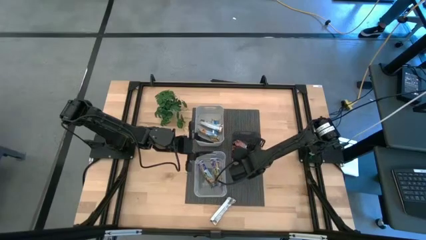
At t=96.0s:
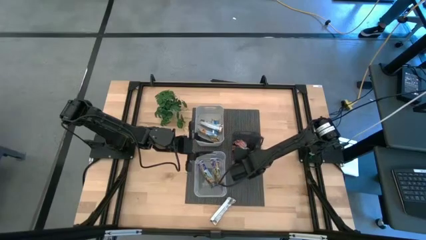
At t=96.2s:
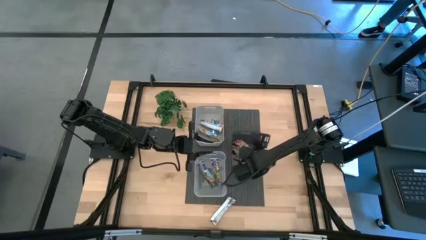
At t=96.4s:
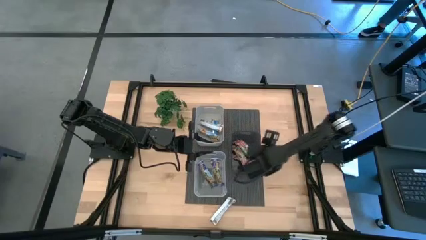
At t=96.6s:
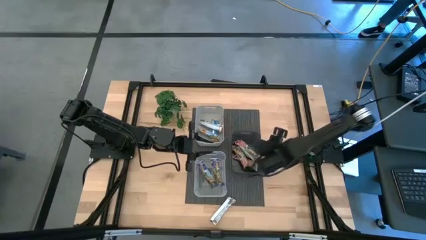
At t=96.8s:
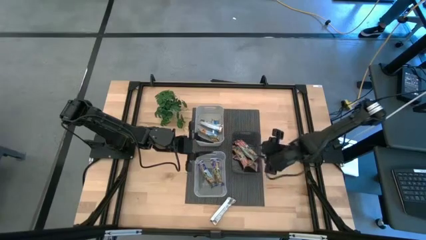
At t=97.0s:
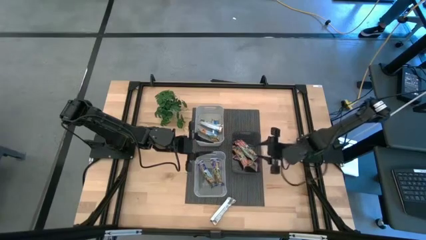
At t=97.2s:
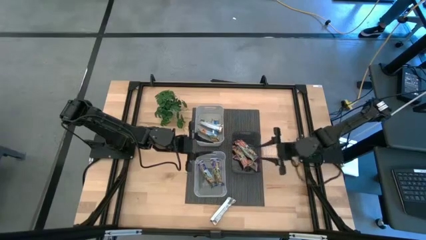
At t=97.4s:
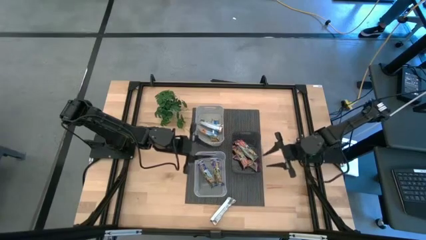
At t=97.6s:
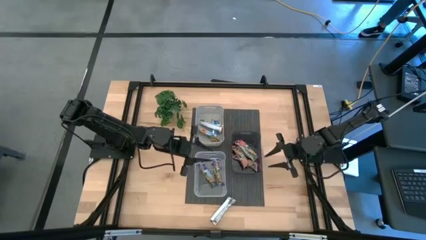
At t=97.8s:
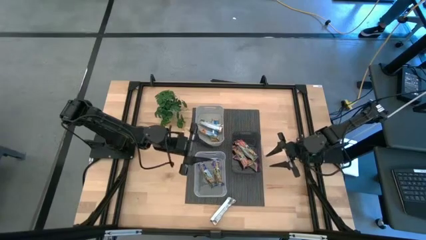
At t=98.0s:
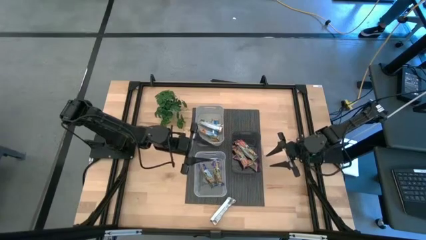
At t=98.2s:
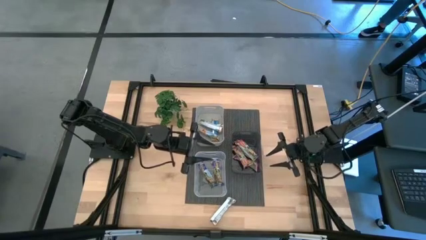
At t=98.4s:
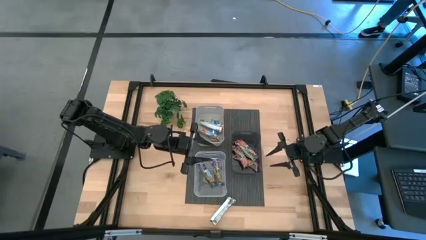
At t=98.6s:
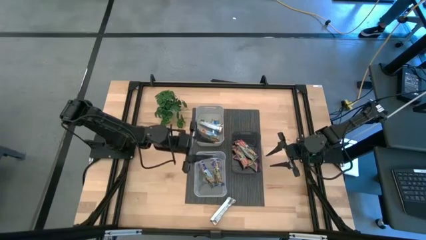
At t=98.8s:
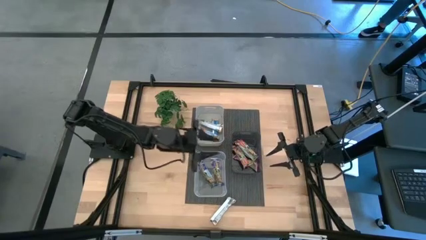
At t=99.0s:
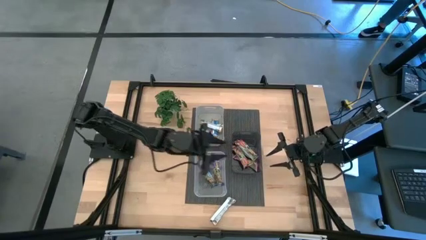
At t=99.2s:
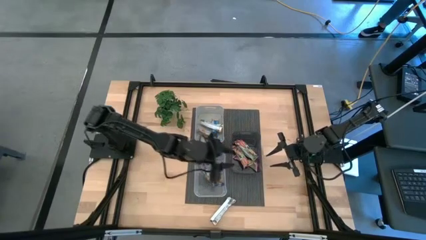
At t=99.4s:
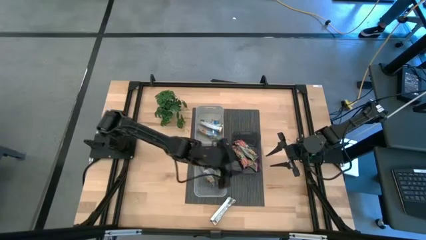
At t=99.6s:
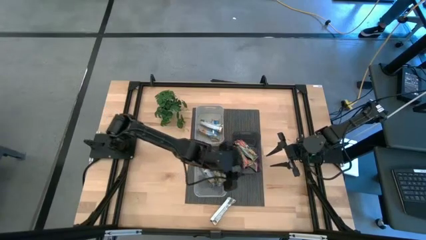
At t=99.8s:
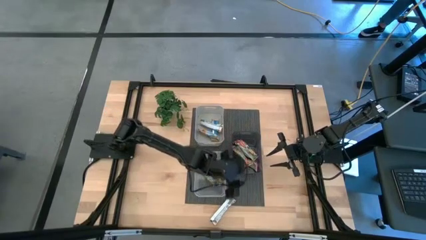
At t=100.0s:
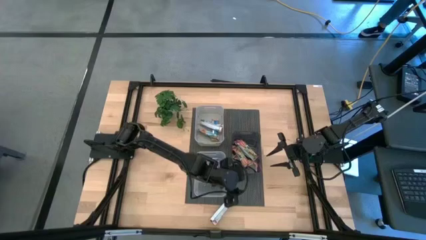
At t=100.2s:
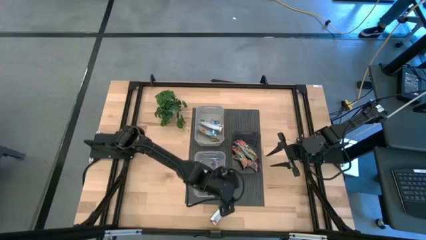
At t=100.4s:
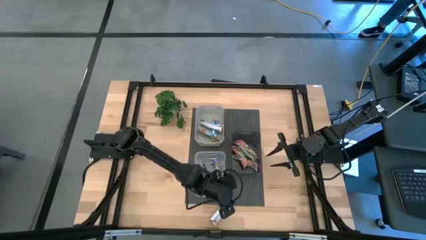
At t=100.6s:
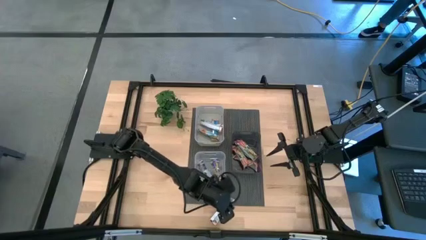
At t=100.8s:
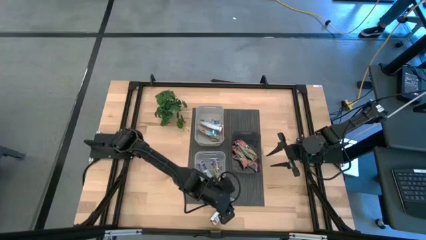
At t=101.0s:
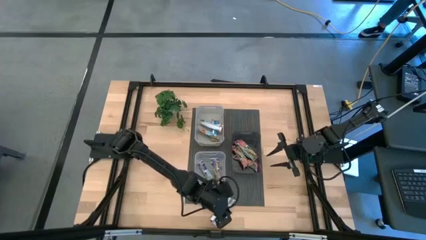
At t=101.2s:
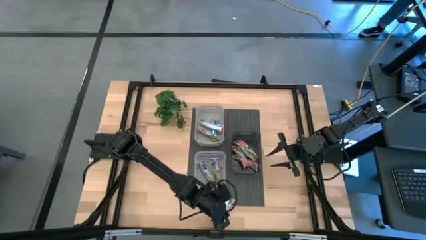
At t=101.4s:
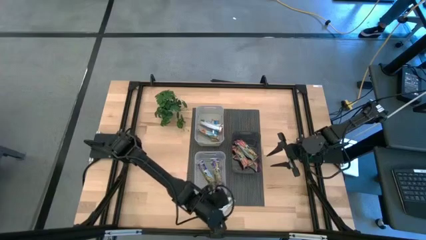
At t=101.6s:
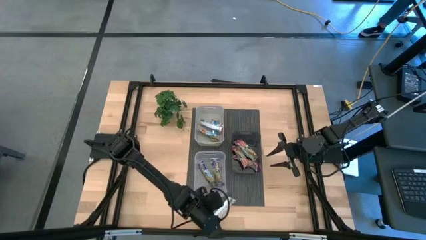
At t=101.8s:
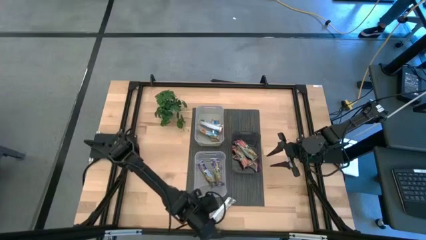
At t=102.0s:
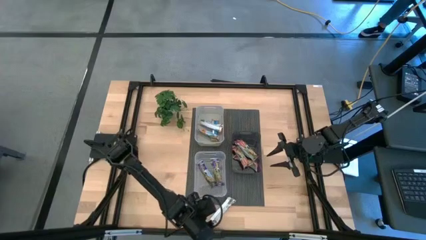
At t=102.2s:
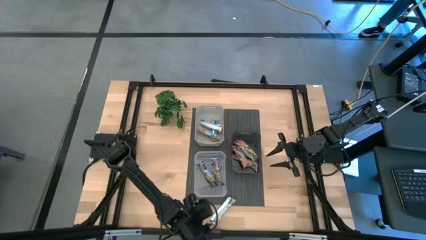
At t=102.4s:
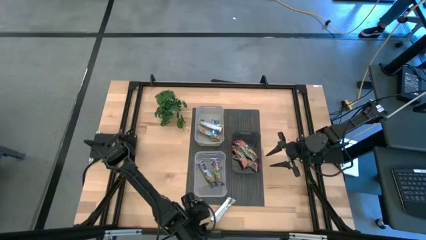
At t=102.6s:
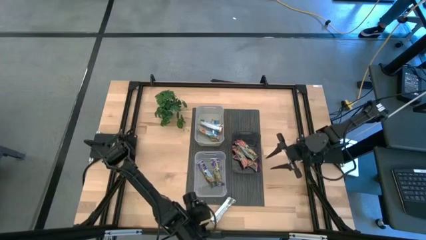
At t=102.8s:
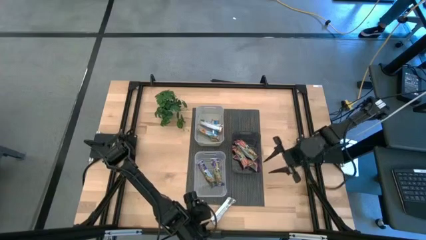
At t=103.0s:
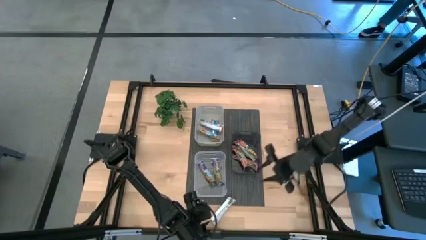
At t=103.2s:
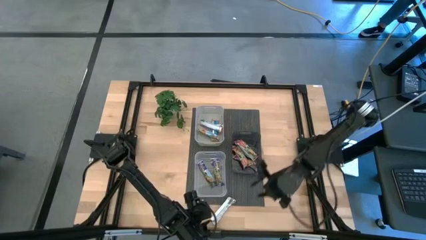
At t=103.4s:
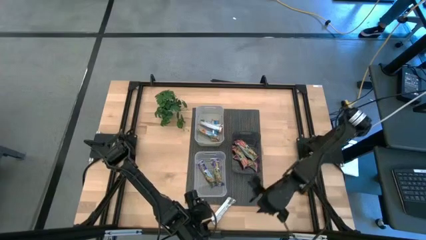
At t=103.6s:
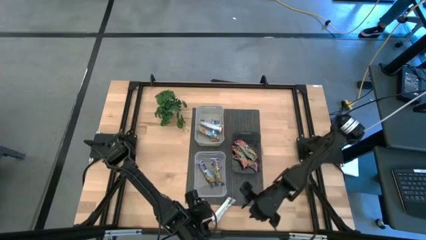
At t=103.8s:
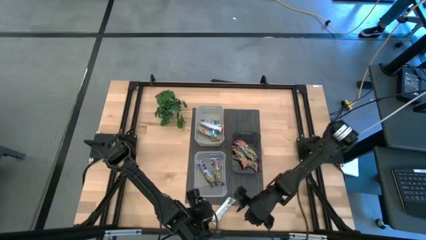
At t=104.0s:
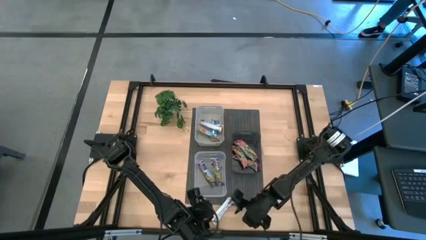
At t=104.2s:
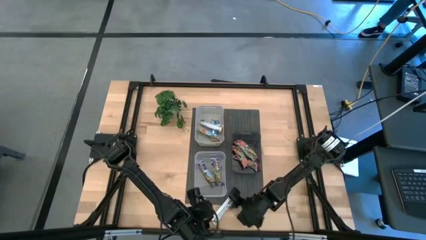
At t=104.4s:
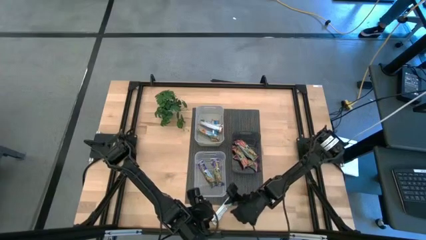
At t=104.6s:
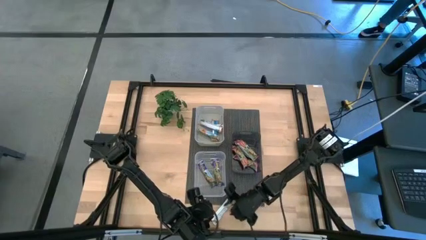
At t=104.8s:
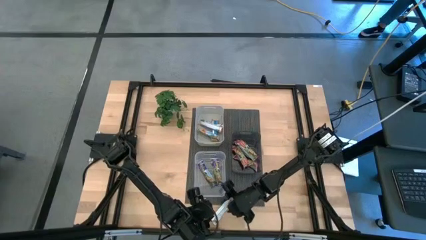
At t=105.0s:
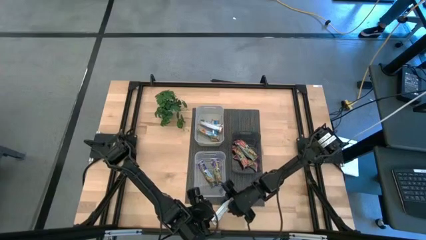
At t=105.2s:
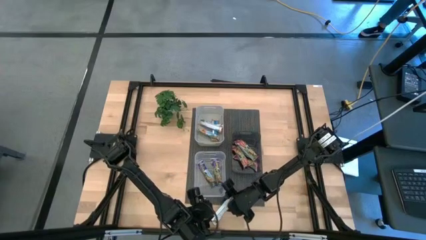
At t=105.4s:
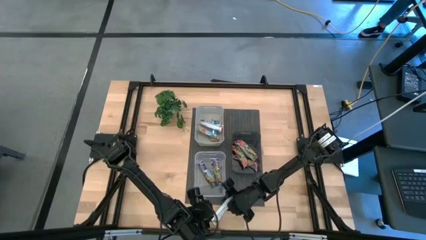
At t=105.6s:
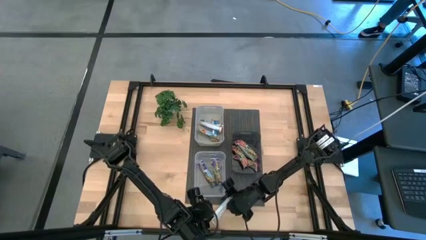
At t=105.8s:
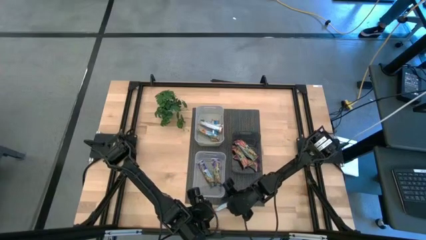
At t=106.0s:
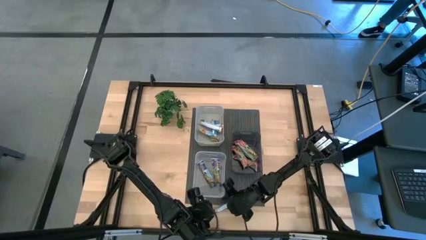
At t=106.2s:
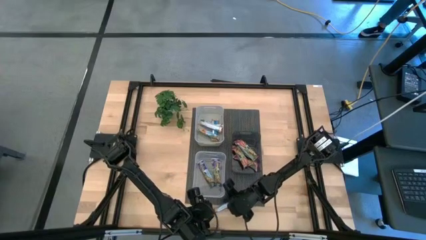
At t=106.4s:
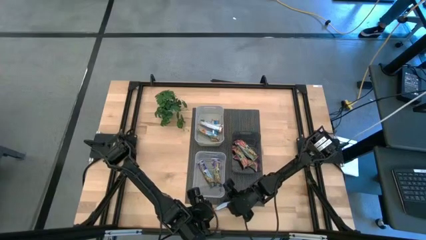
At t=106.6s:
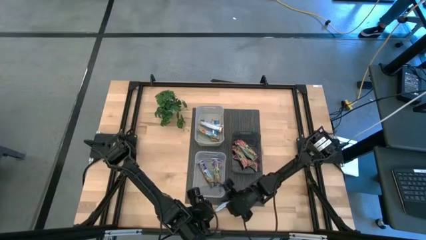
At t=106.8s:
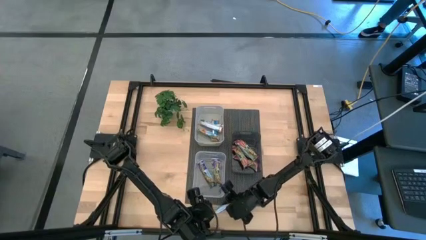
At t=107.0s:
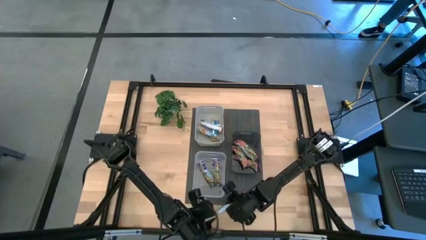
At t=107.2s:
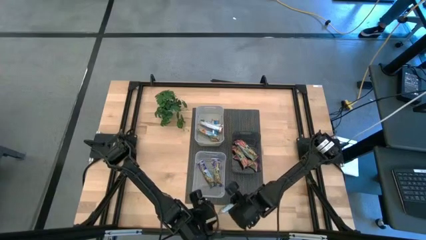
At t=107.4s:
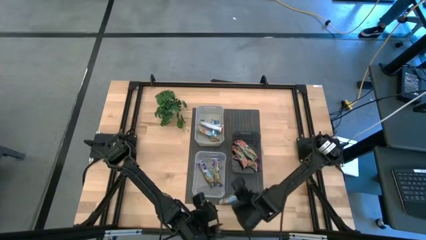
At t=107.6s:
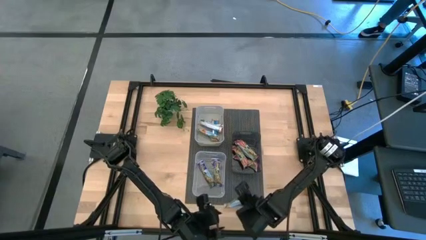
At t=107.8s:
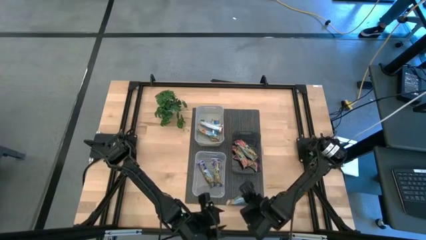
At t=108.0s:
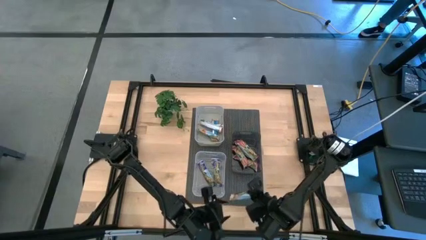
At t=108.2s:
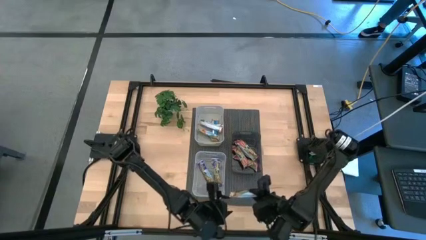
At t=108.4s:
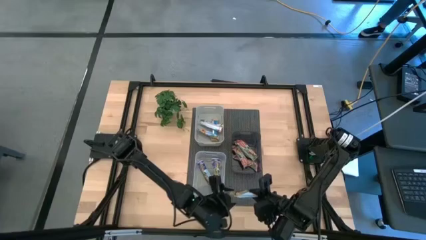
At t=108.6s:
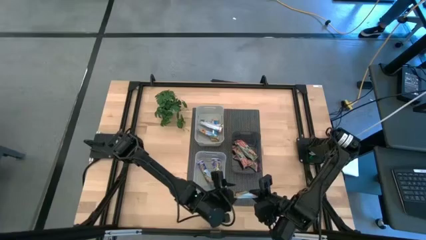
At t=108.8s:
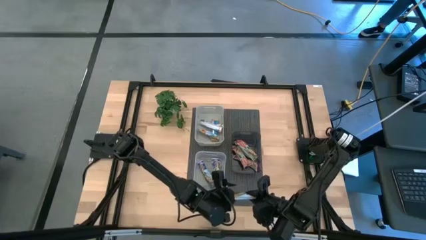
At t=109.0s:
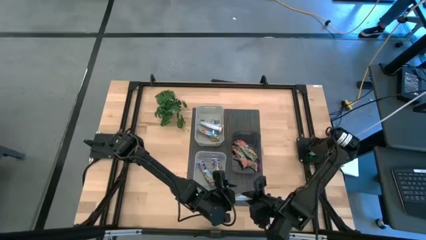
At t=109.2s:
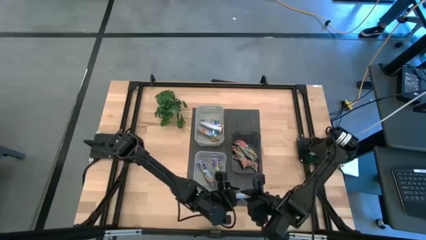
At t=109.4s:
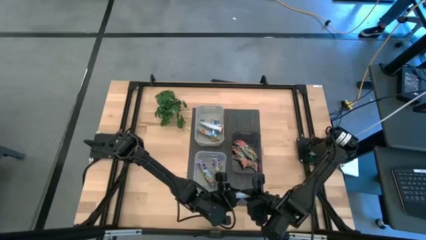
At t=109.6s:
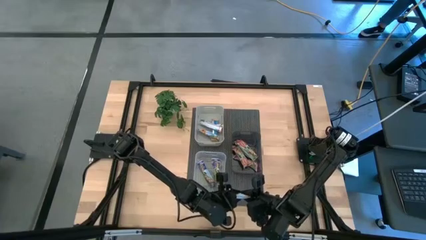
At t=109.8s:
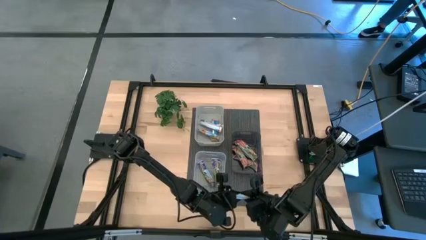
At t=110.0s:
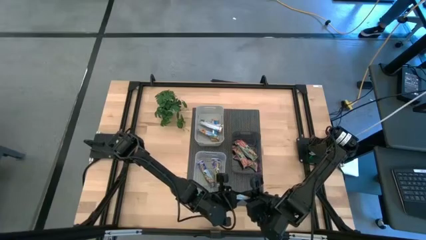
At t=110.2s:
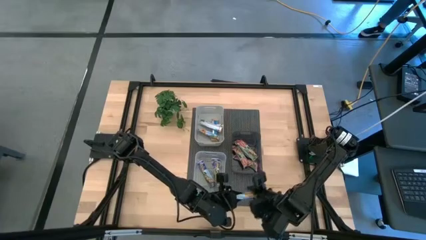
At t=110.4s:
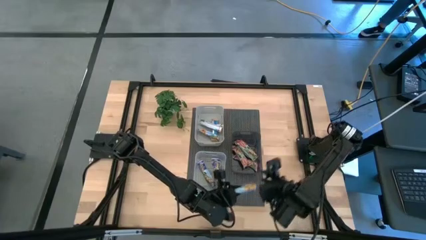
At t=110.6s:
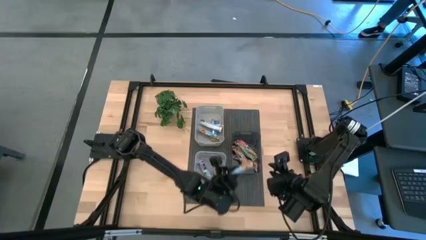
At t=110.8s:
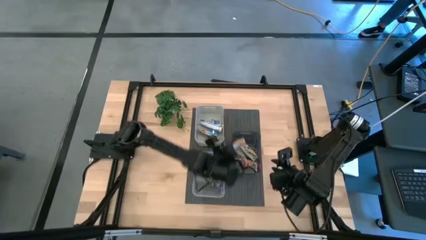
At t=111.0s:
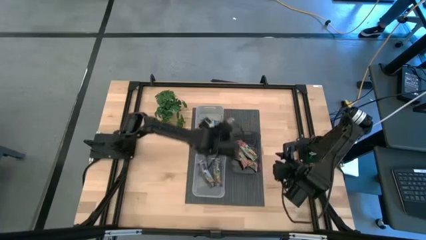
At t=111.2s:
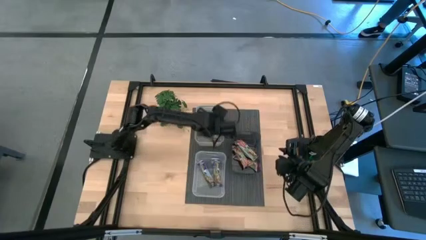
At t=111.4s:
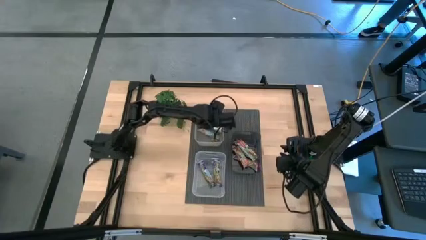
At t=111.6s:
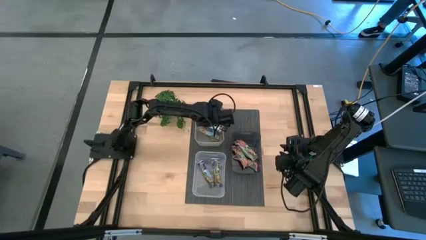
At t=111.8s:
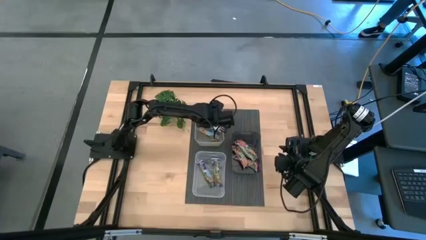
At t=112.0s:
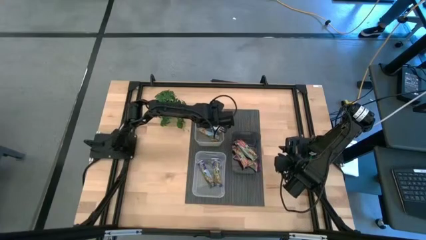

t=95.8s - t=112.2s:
Task: Pick and place Granola Bars by type
Put the yellow granola bar into the gray bin
